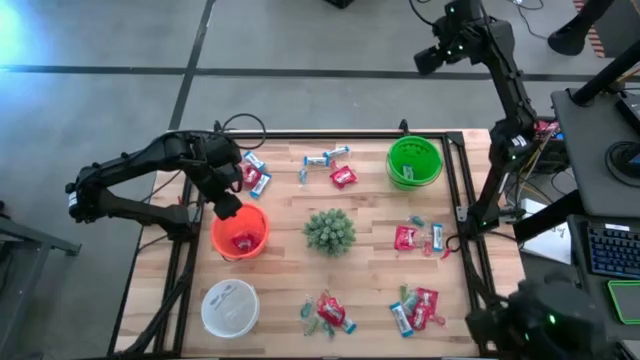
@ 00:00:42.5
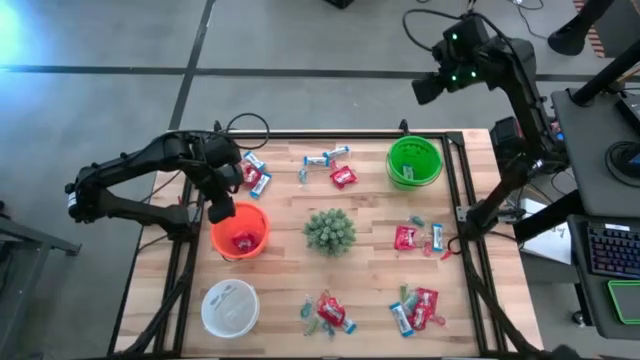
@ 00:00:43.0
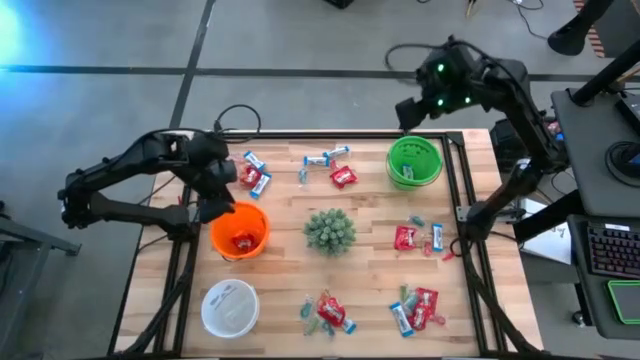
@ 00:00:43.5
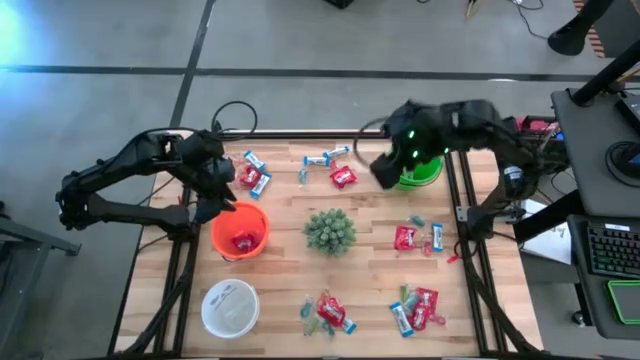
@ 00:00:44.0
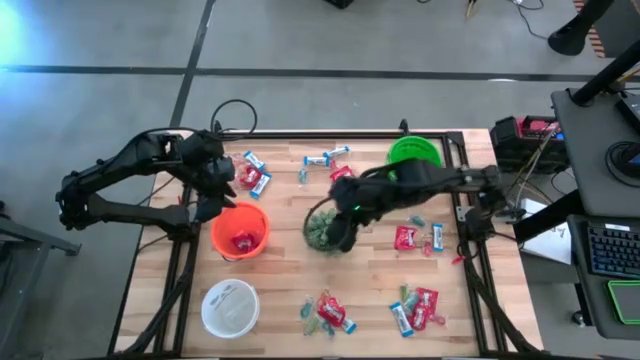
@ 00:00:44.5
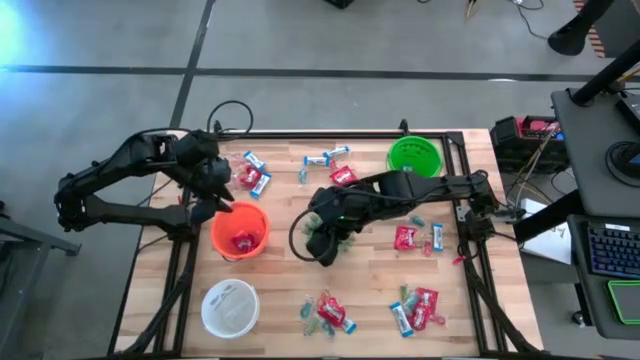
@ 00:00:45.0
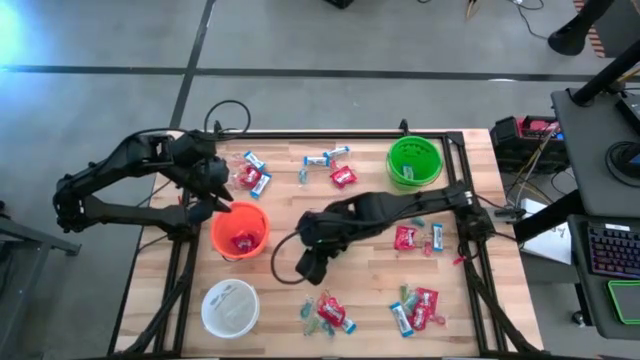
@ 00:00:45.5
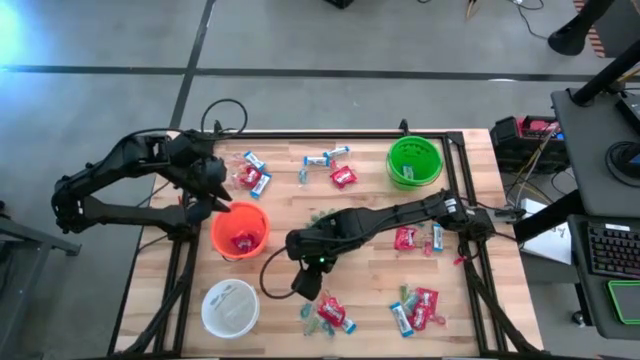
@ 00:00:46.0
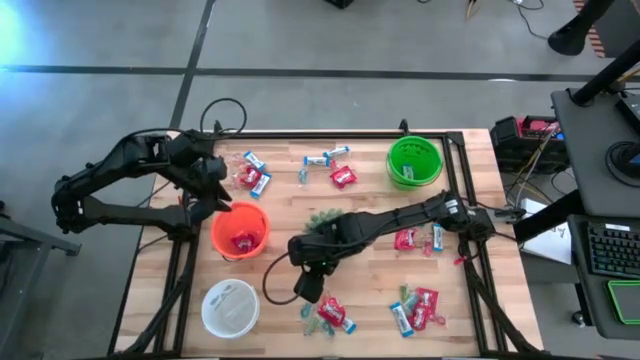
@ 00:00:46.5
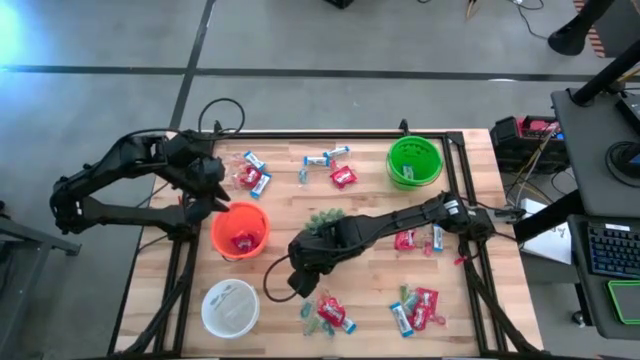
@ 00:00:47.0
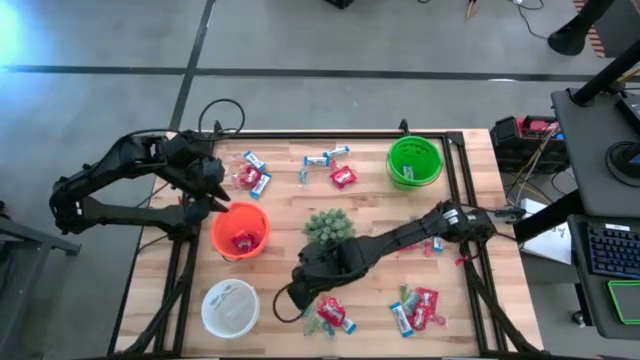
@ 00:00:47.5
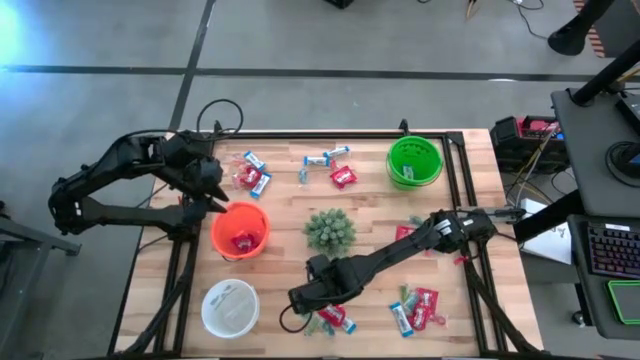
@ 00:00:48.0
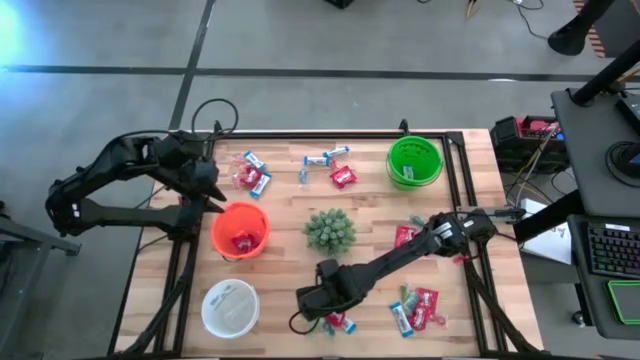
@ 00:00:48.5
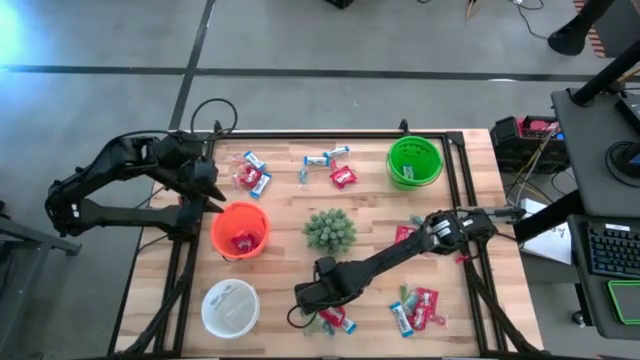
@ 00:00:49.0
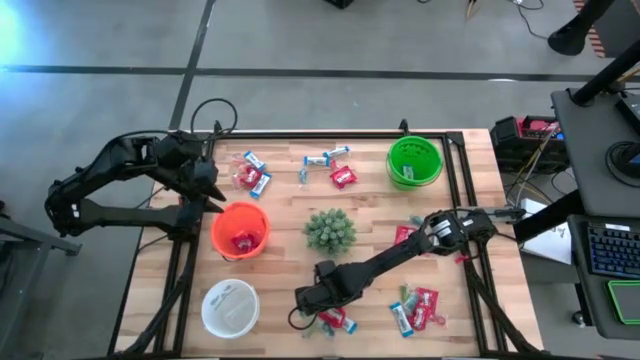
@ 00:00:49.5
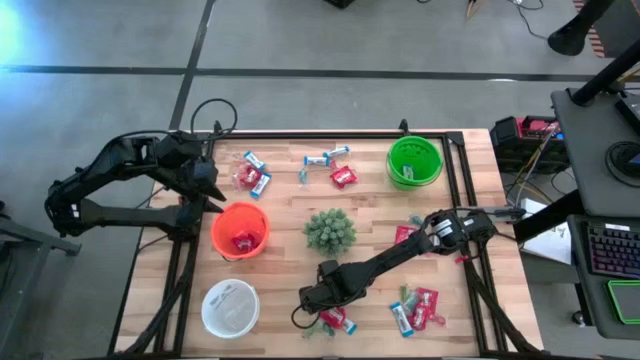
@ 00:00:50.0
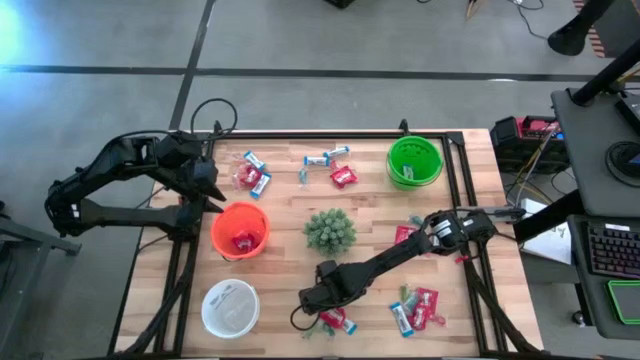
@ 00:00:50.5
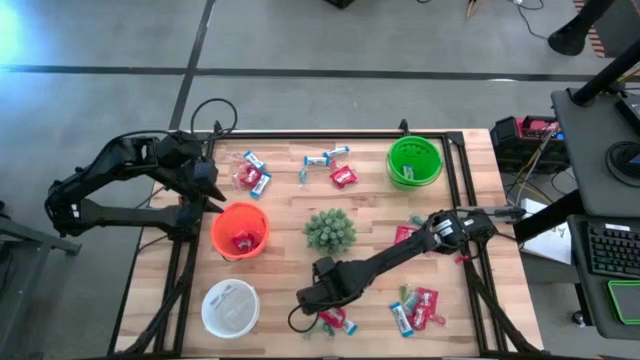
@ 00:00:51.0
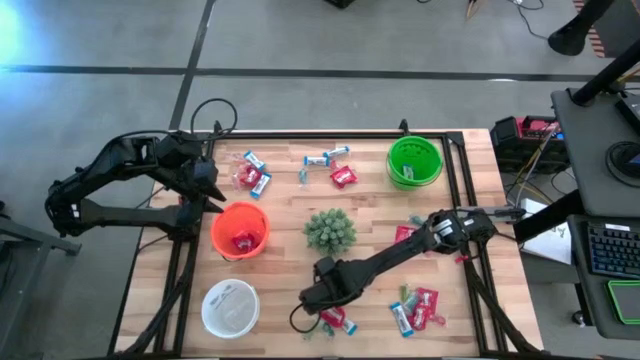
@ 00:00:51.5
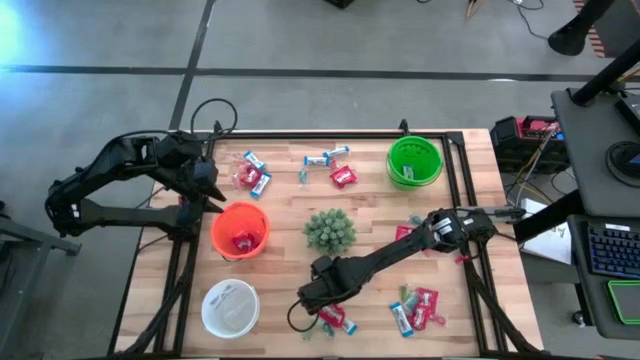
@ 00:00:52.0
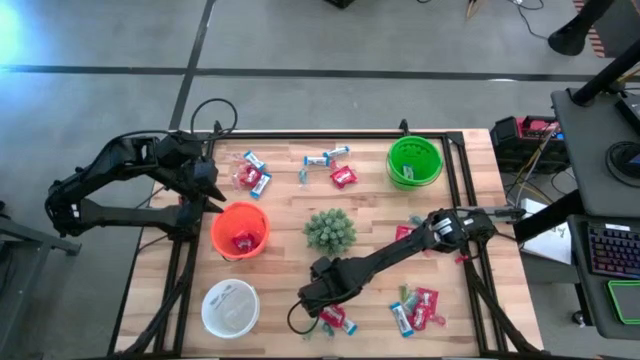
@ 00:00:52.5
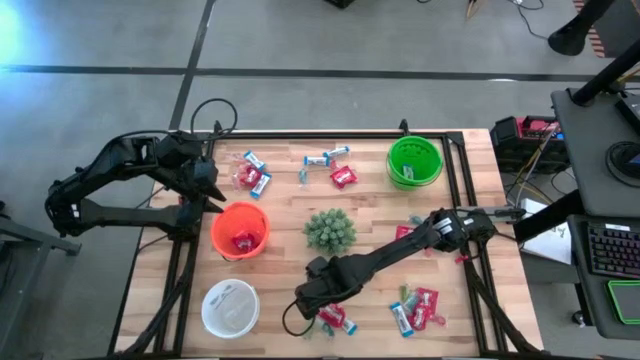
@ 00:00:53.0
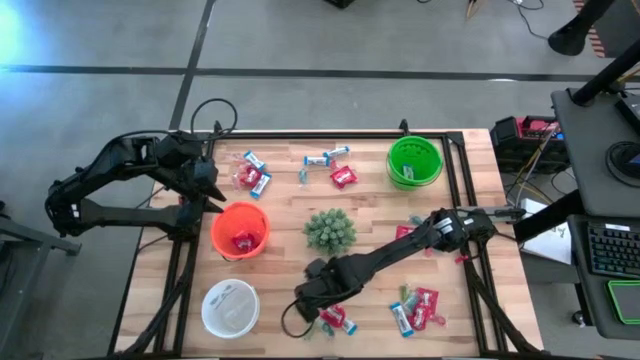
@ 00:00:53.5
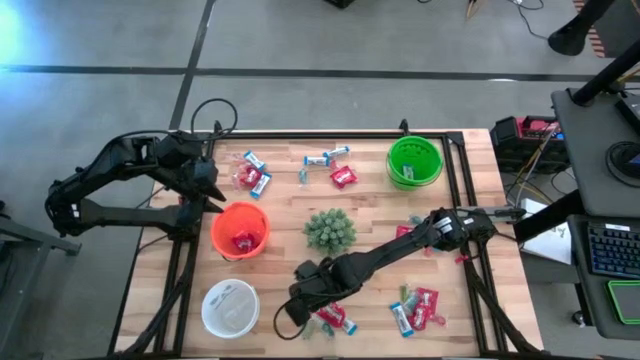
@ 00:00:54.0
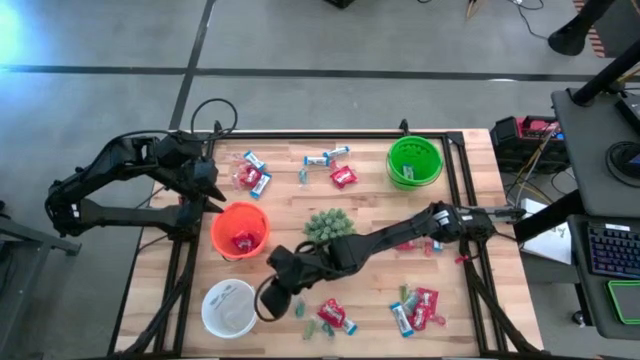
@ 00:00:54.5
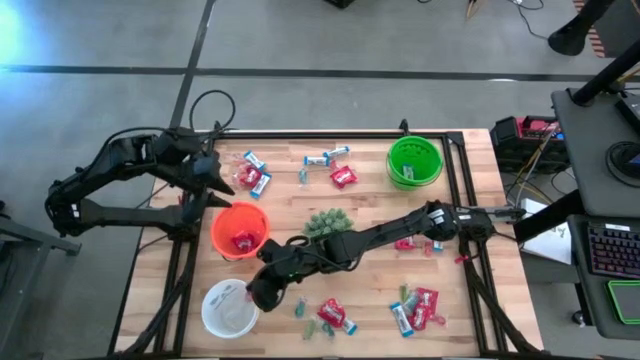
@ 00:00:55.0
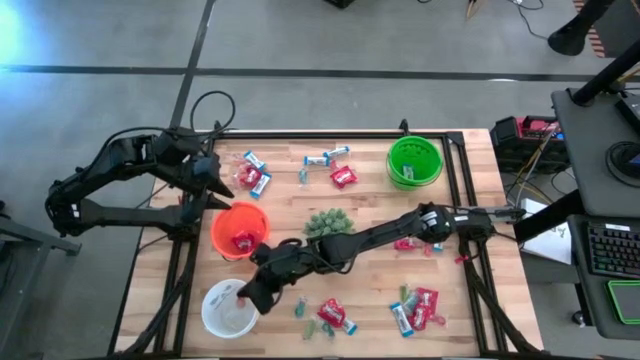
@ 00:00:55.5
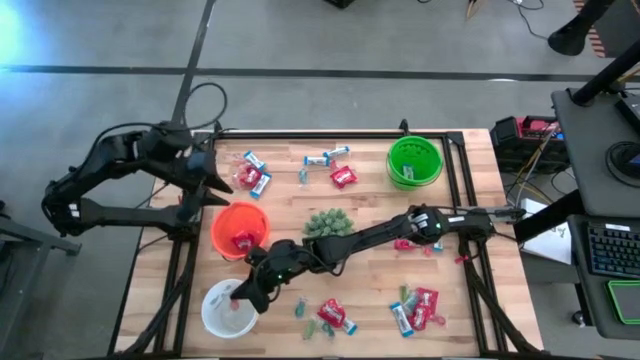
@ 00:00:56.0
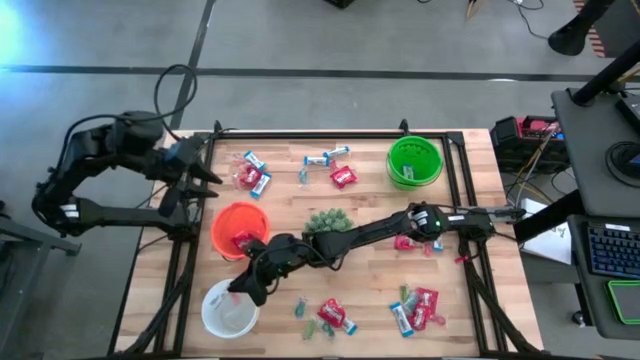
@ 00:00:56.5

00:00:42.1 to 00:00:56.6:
Task: Sort candy
Put the orange gummy into the white bucket

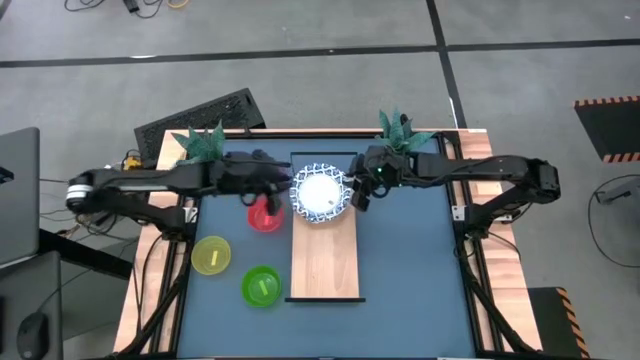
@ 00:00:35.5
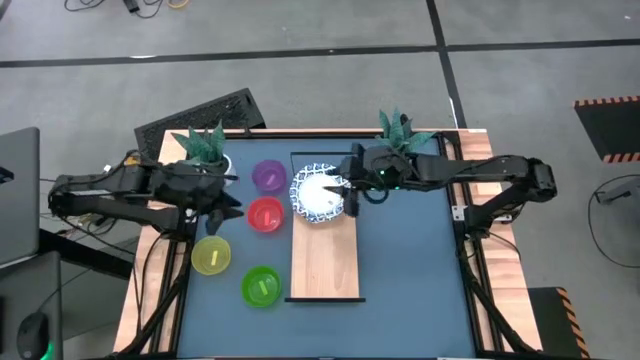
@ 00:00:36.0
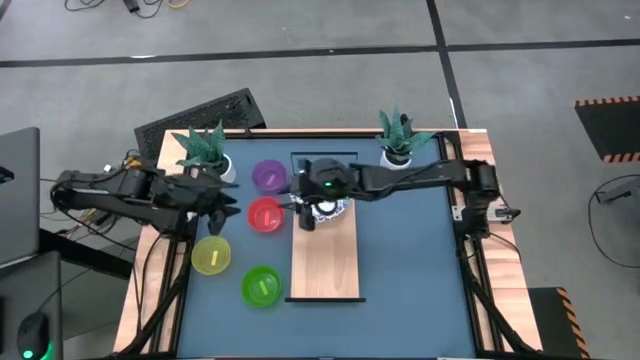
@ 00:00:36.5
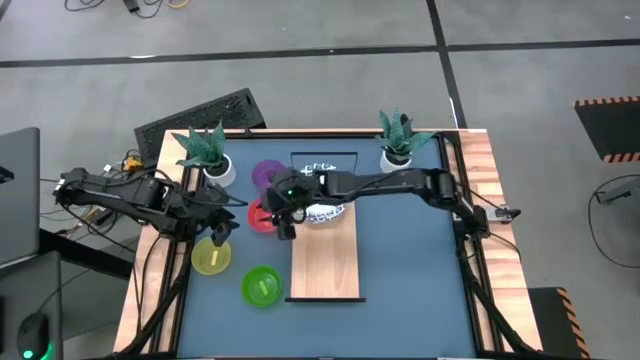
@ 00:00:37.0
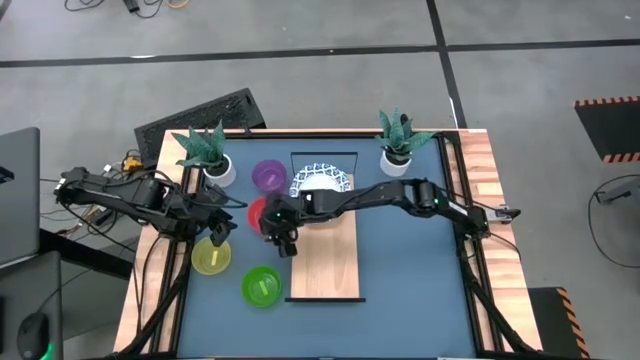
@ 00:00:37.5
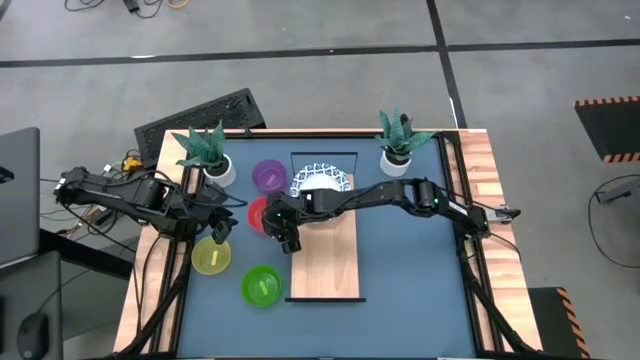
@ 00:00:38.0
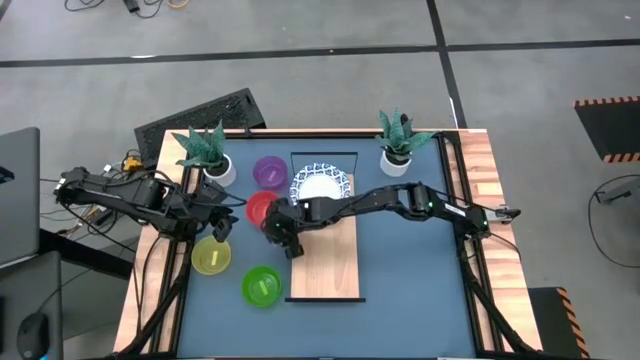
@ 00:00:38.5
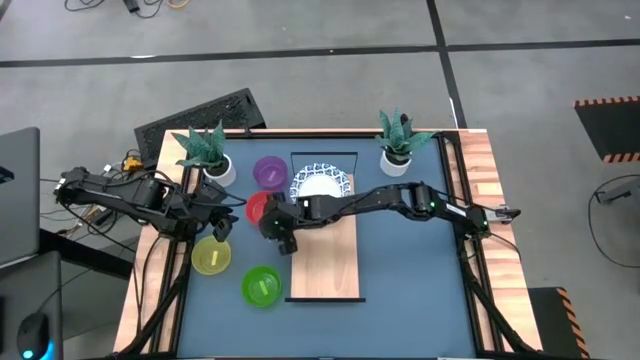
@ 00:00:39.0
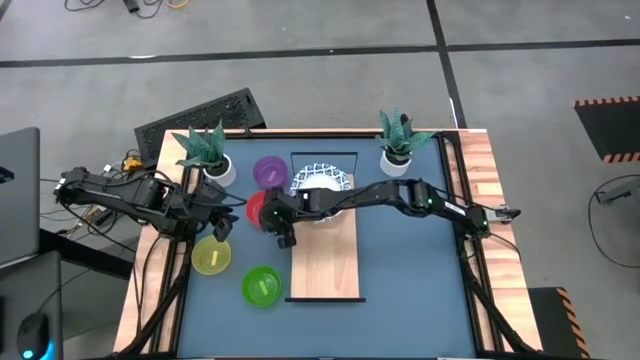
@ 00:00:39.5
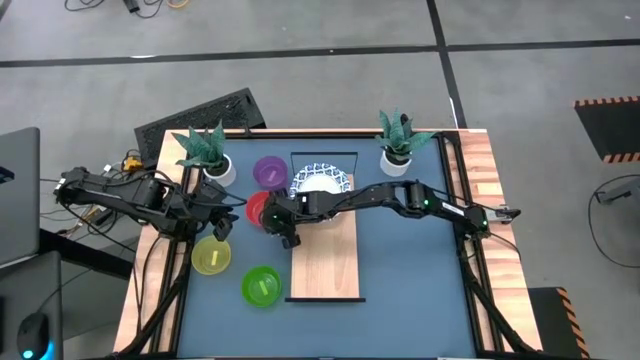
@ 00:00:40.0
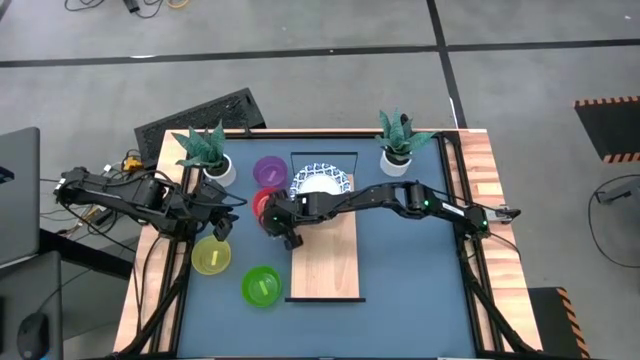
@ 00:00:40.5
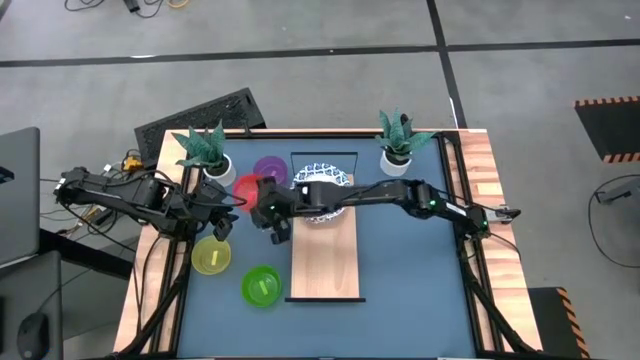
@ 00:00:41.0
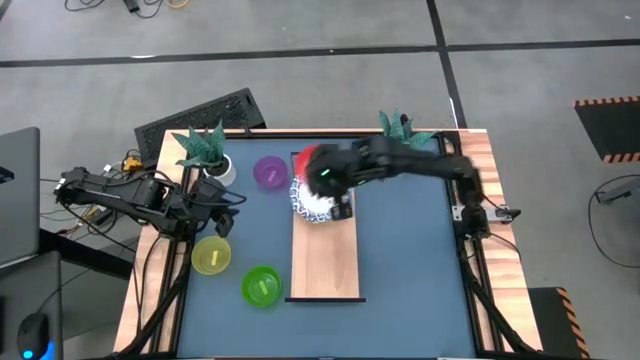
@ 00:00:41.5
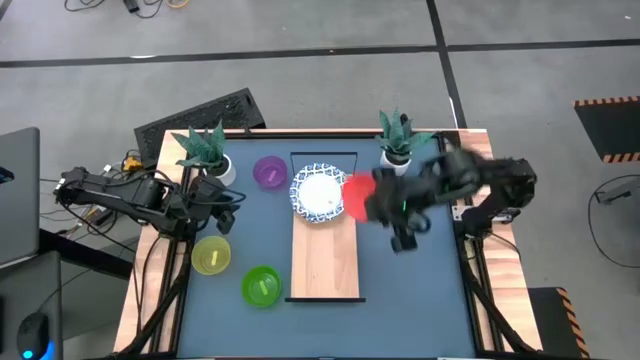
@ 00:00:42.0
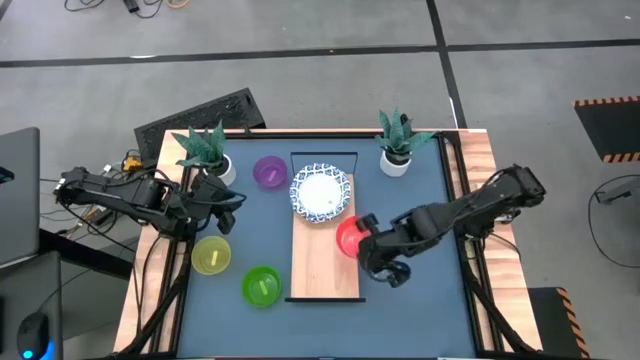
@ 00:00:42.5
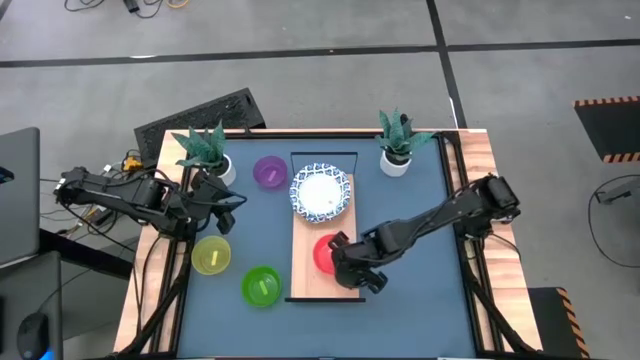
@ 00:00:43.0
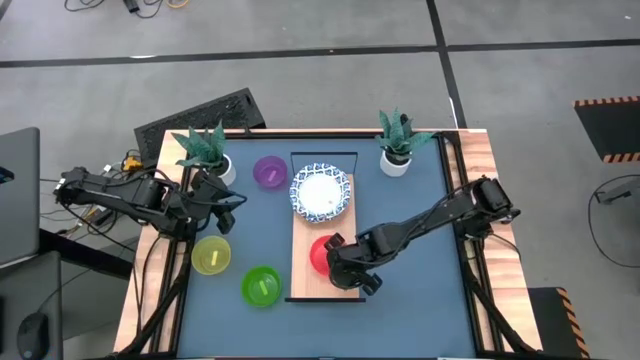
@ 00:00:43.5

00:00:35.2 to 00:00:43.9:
Task: Place and stack bowls onto a shelf
Put the orange bowl on the shelf
